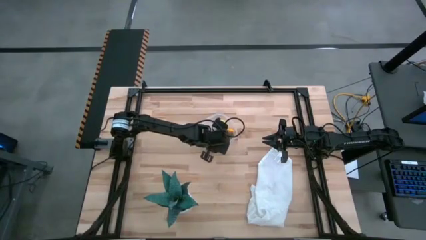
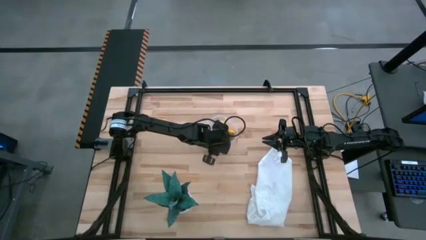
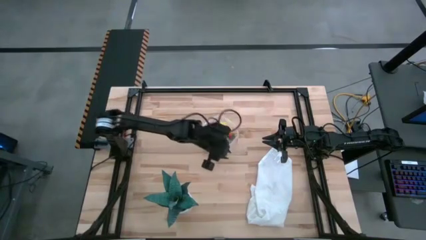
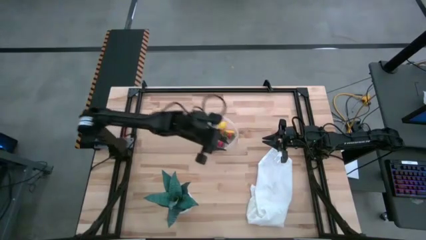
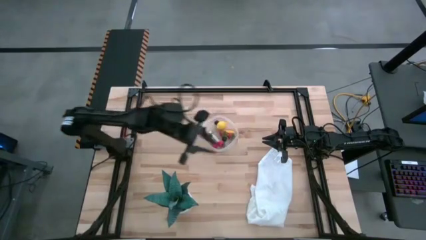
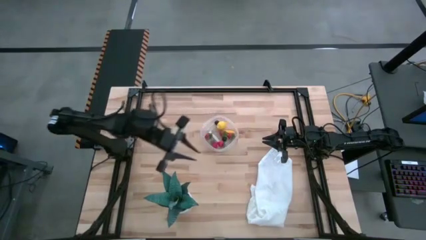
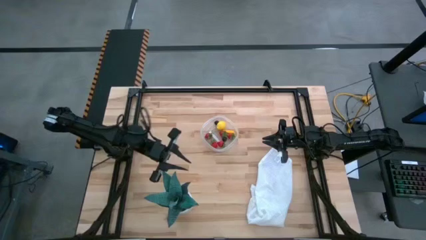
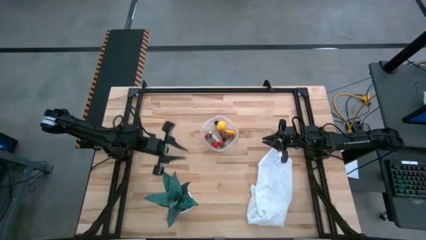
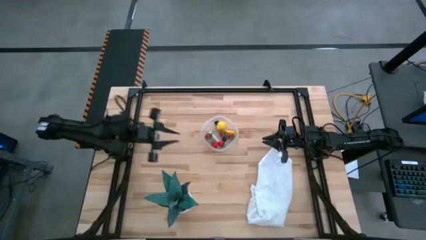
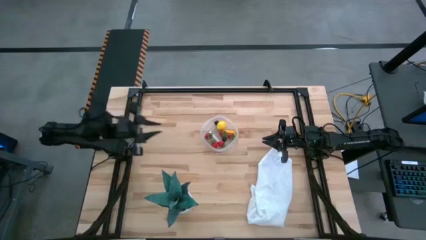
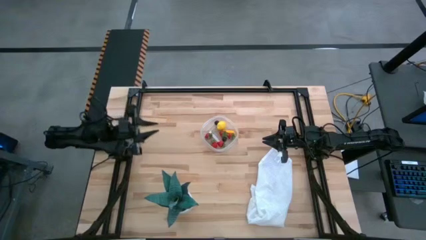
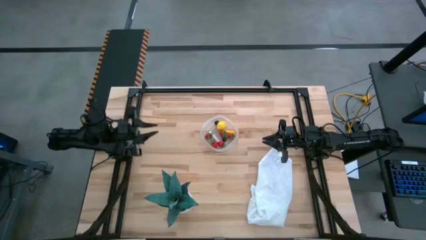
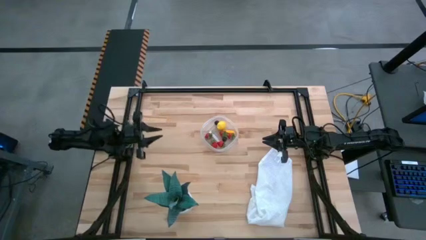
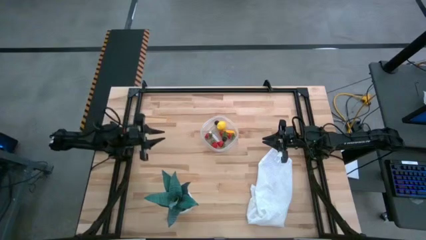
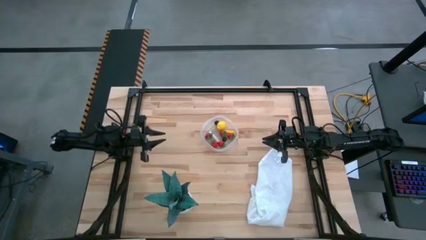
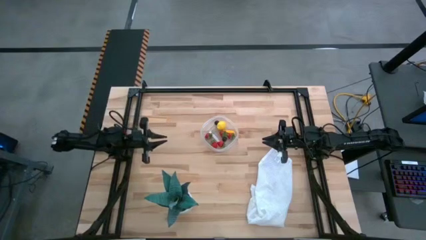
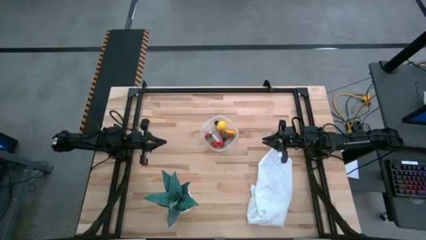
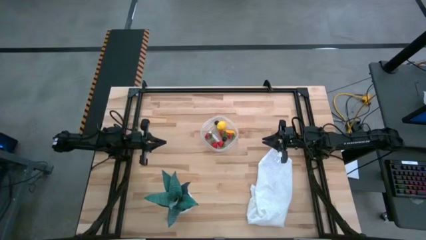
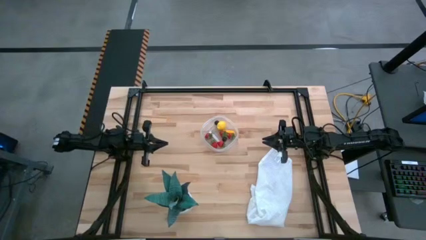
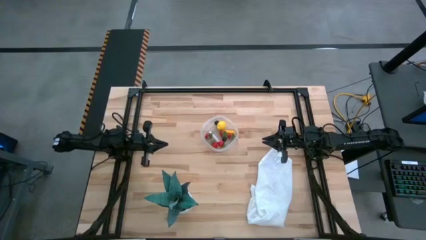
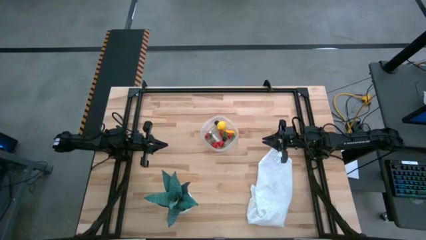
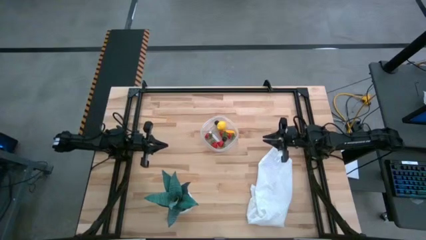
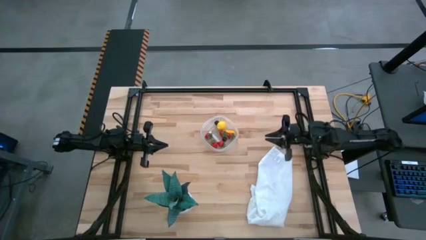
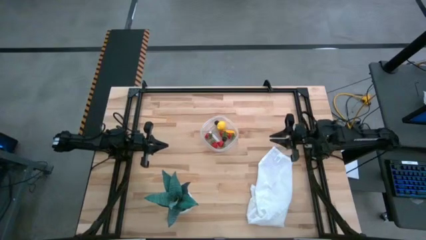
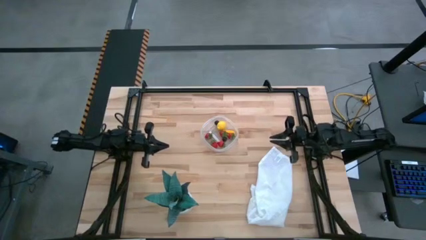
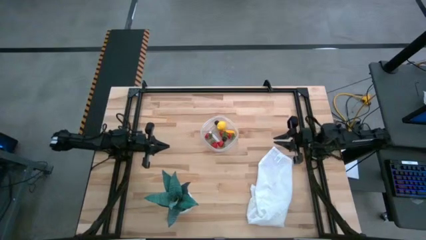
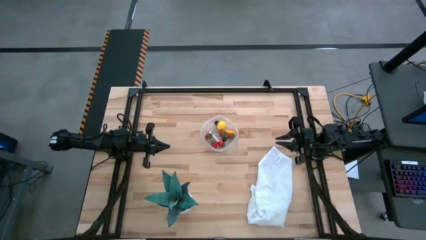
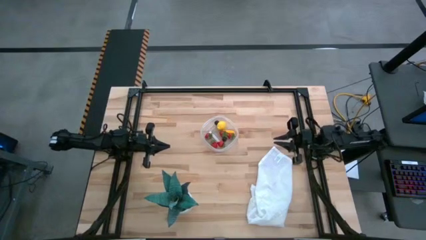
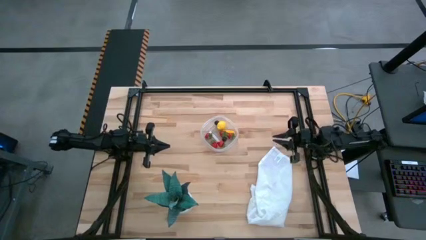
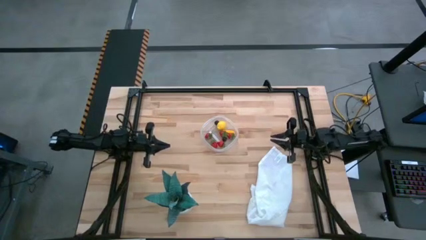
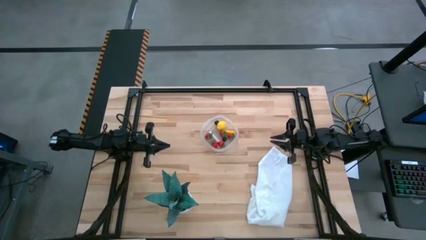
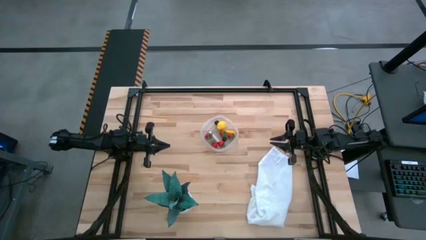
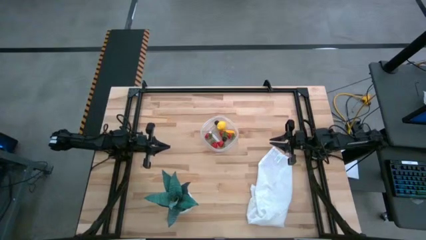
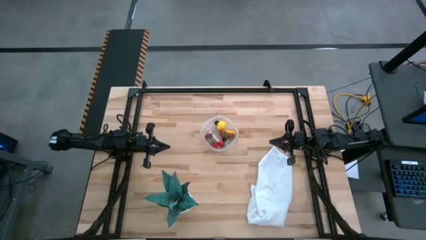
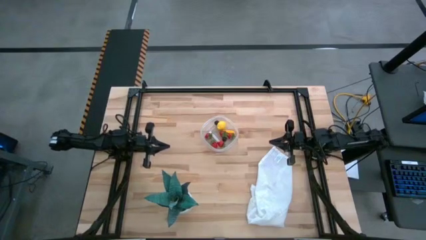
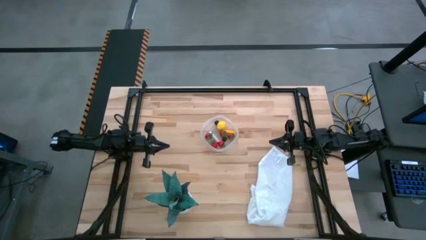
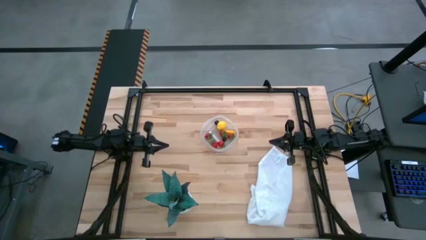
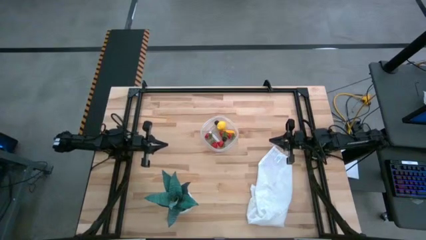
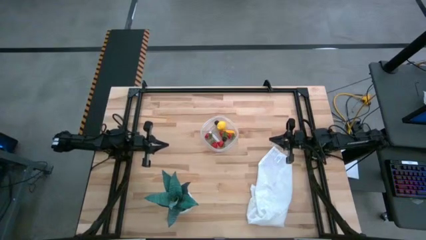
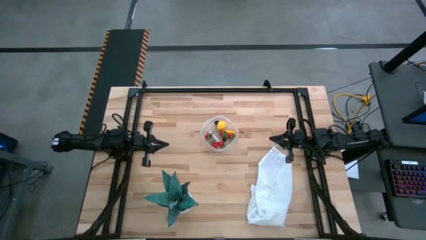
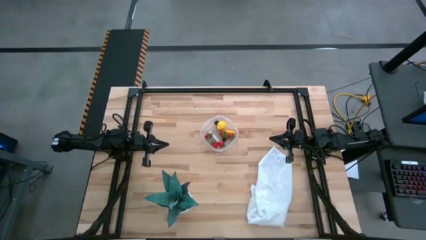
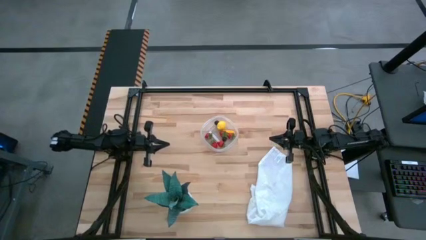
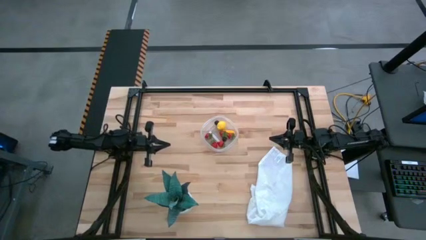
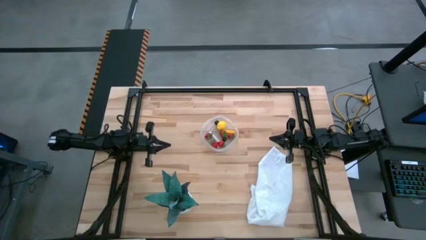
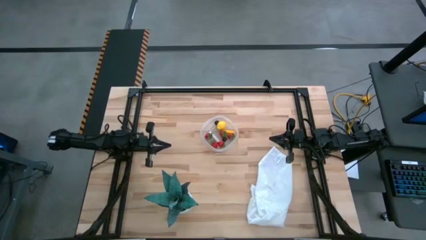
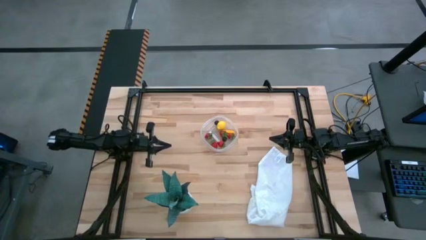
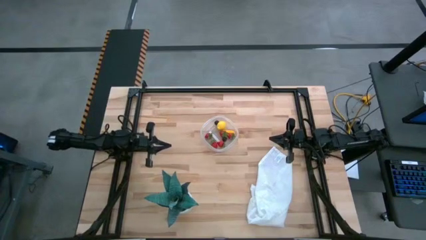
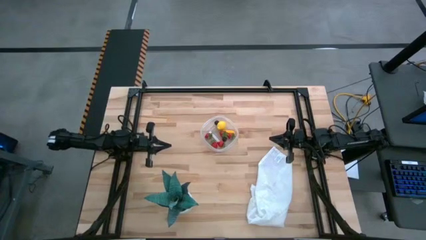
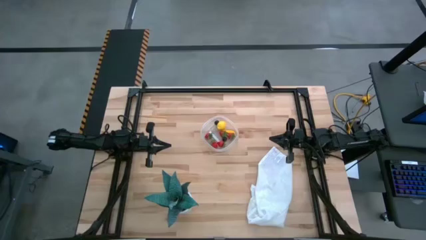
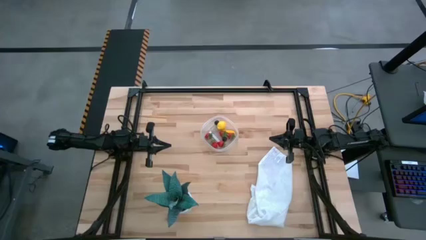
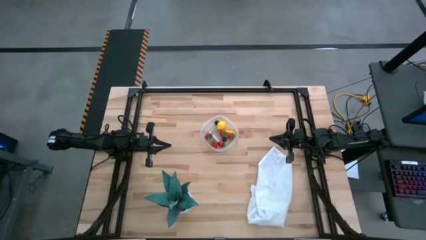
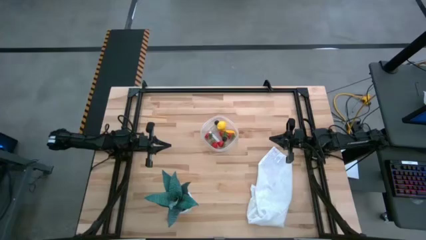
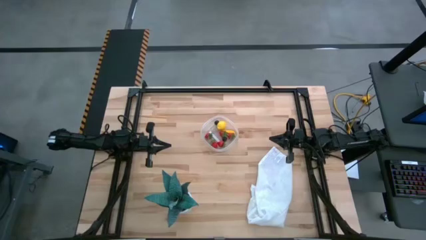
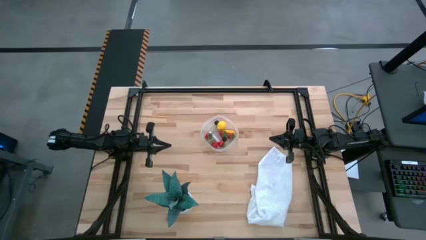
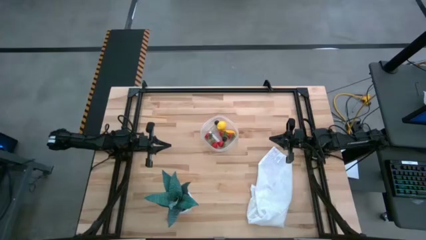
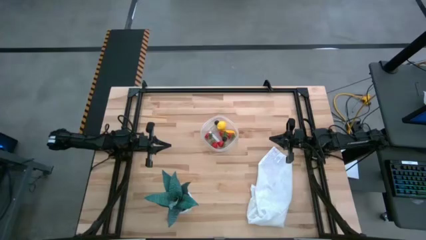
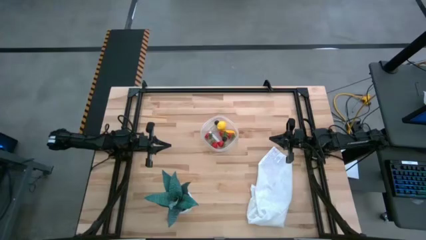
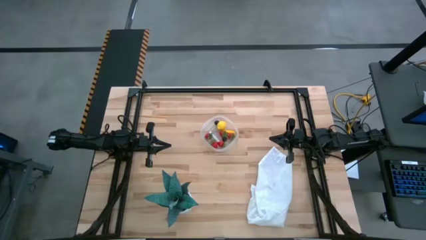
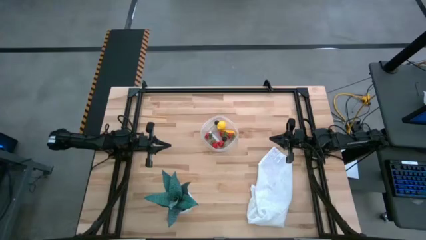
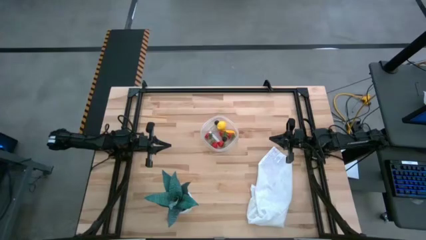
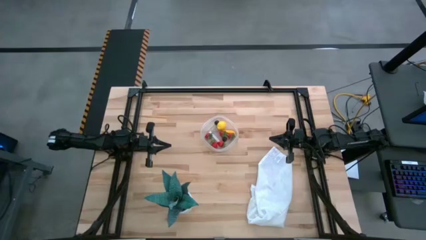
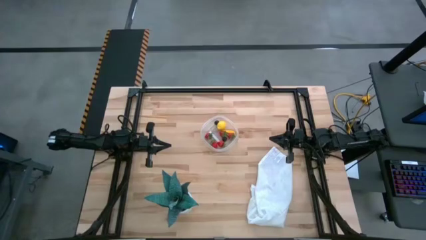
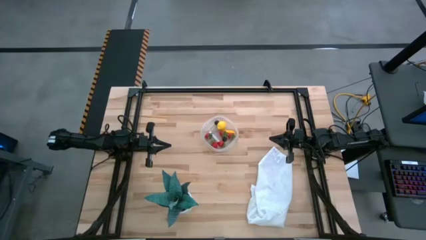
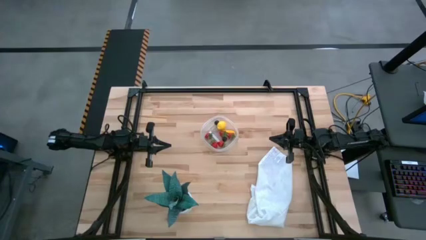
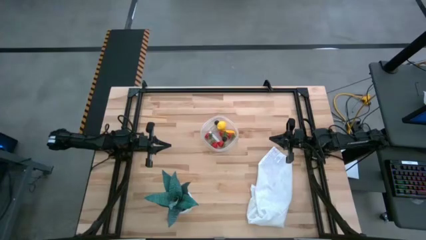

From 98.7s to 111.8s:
Task: Pick and placing Produce into tupperware
Return to Home Position

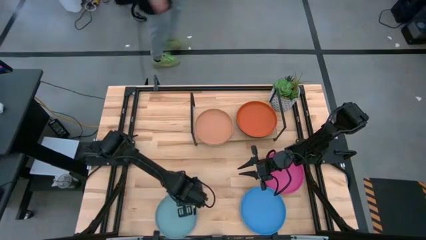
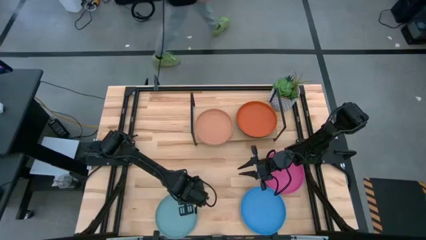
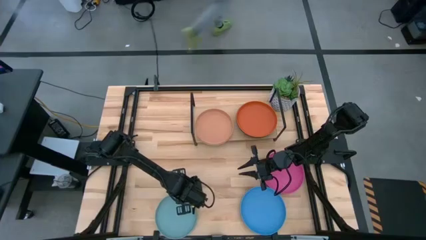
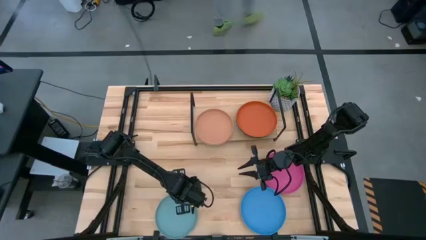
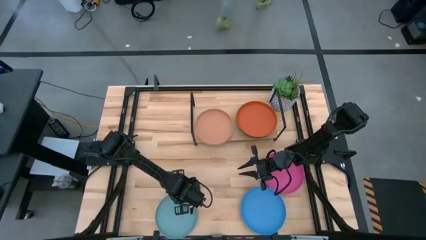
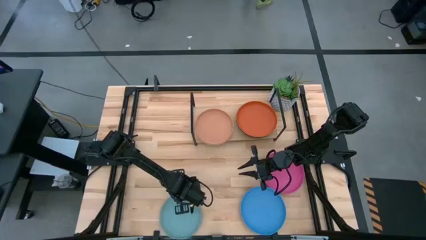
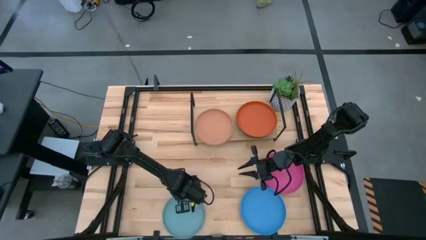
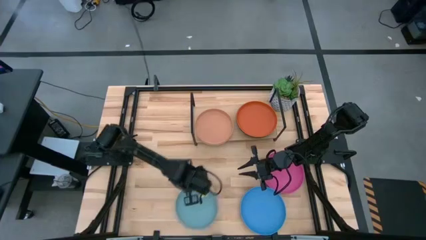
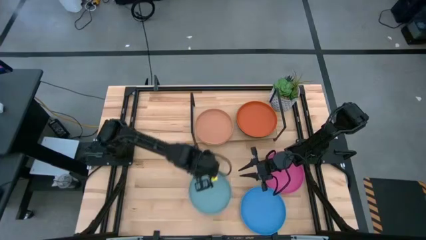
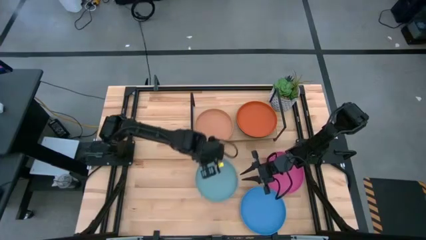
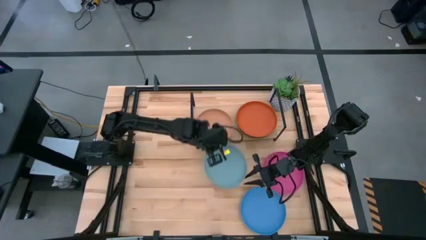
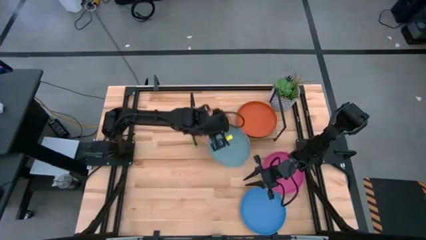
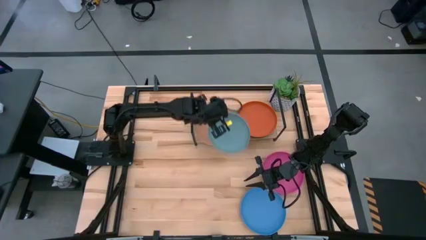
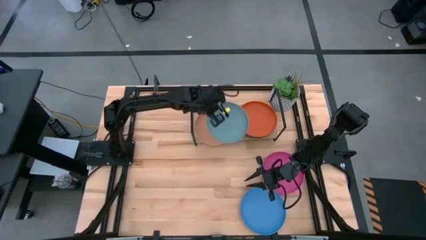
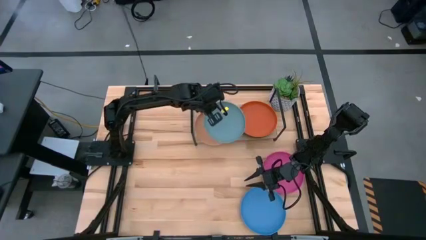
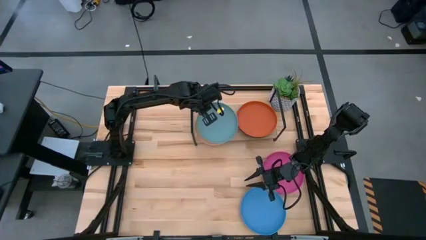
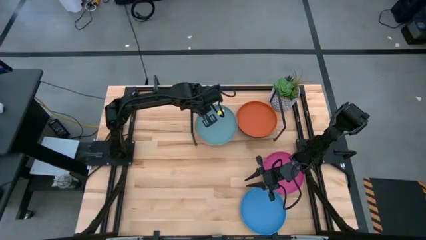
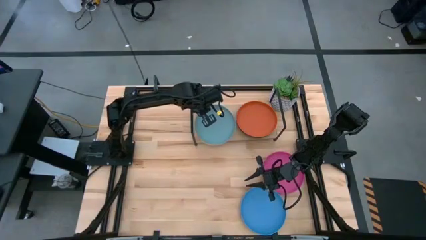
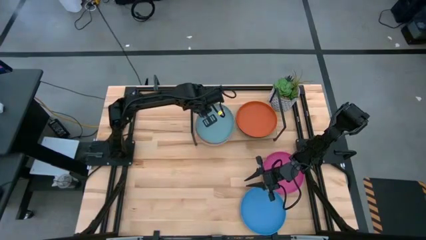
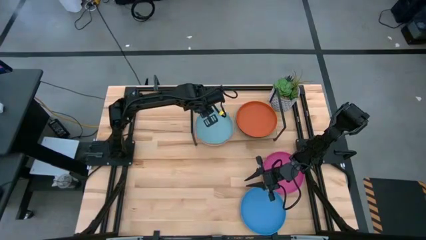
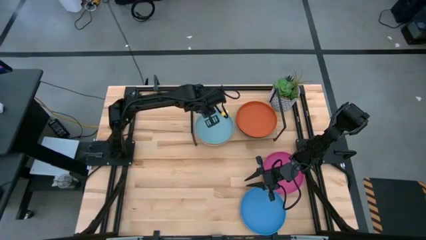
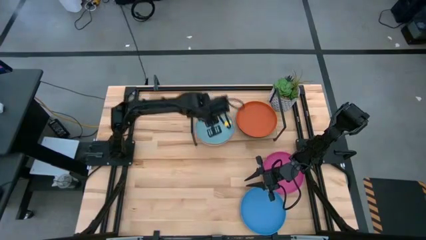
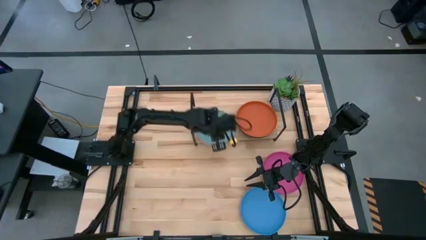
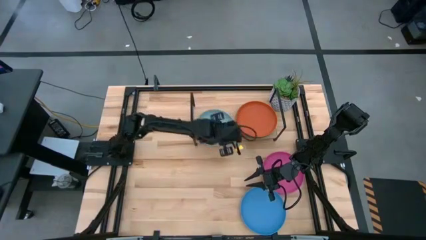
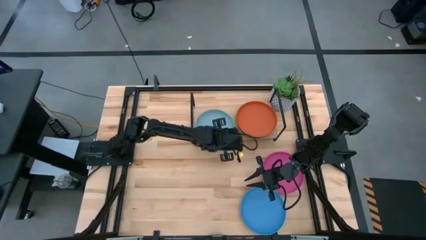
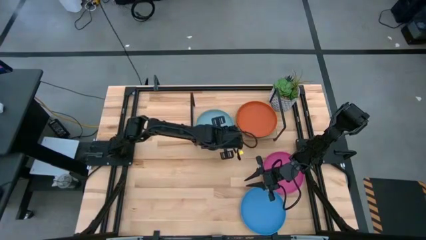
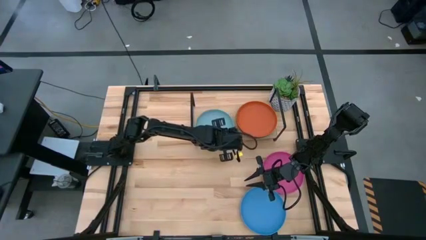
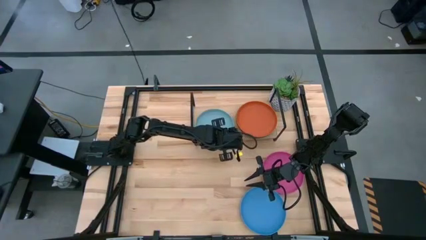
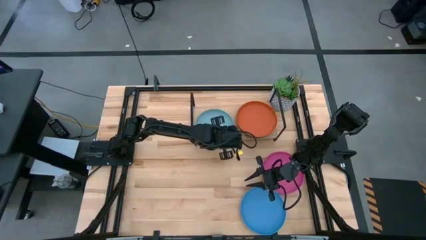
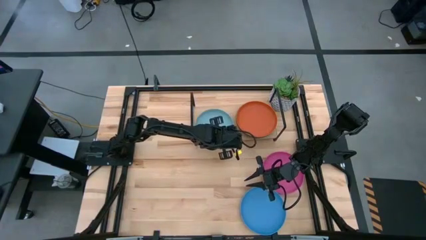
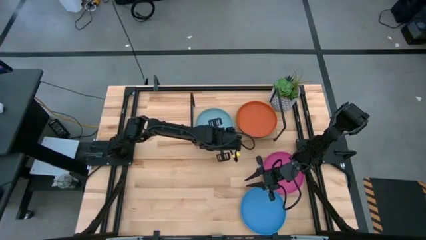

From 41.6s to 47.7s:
Task: Place and stack plates onto a shelf
Stack the light blue plate on top of the brown plate on the shelf
